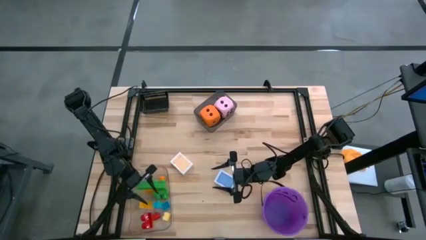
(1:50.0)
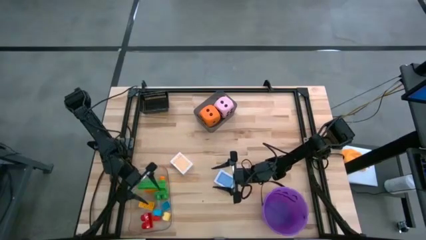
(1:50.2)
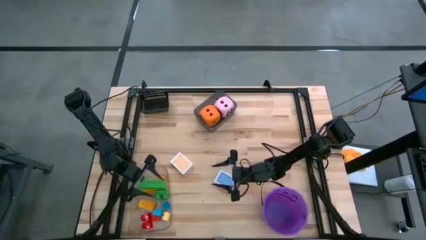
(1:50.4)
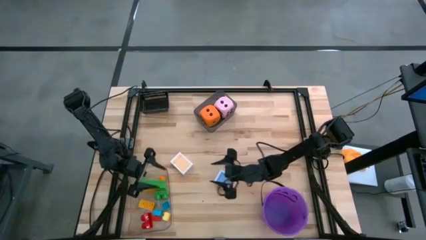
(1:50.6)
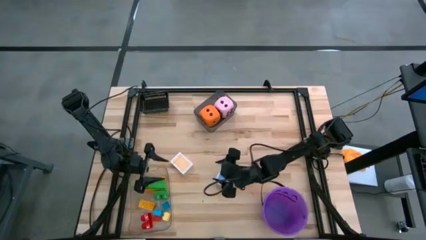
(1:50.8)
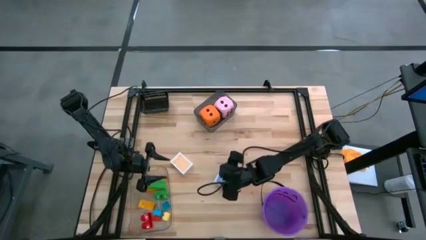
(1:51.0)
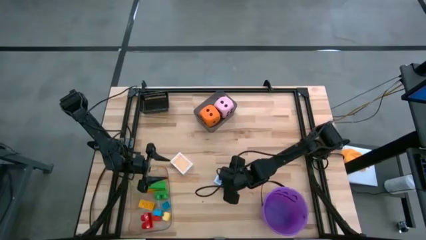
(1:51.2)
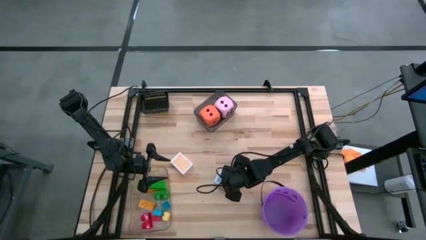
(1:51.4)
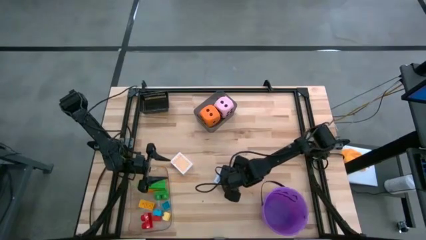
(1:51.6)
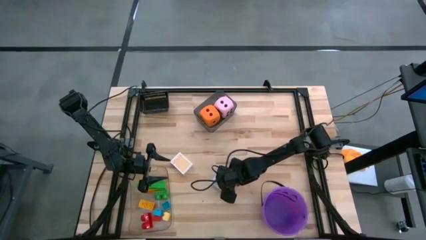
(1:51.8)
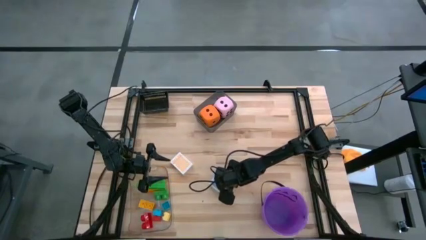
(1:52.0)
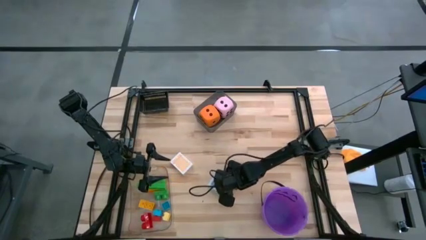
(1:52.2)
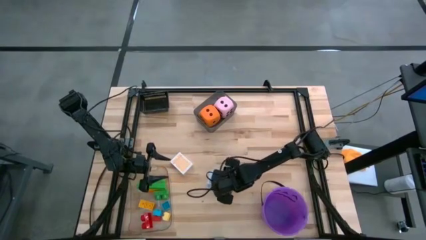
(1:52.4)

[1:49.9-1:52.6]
Task: Pick & Place Toys
Put the blue deck of cards into the black bin

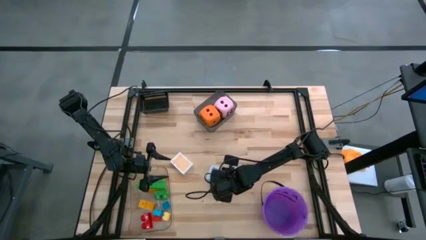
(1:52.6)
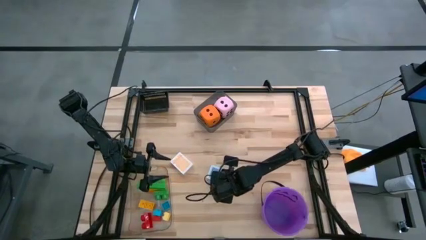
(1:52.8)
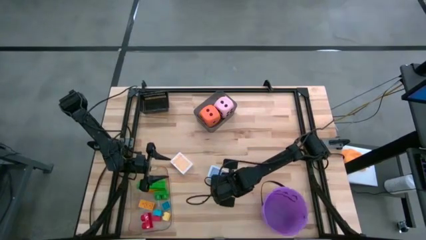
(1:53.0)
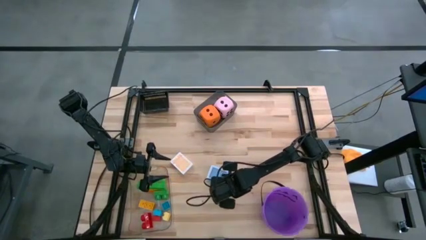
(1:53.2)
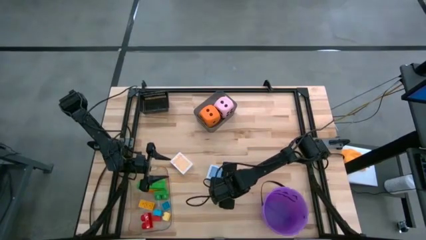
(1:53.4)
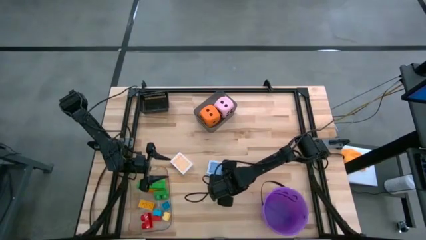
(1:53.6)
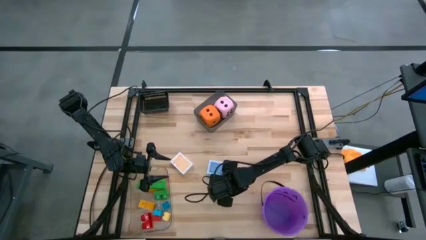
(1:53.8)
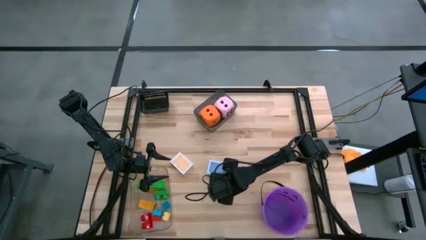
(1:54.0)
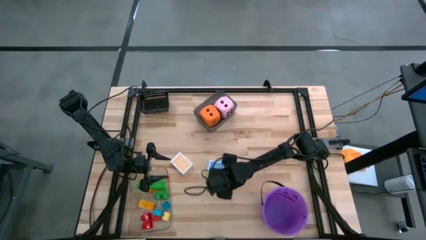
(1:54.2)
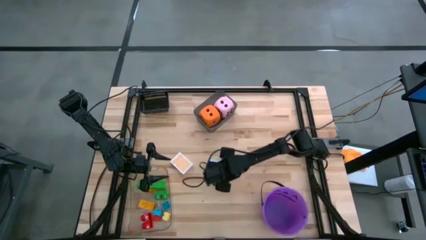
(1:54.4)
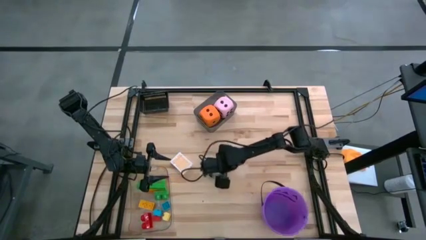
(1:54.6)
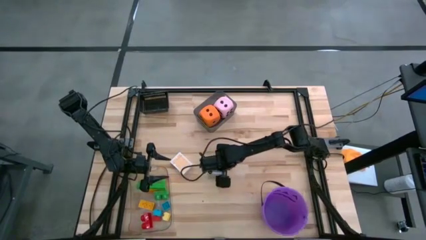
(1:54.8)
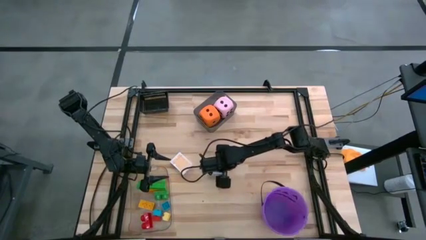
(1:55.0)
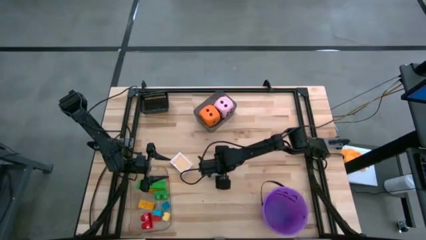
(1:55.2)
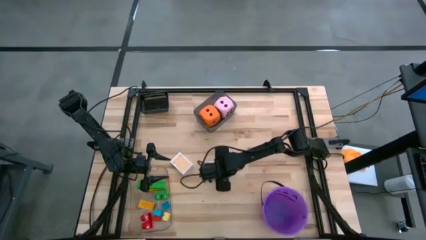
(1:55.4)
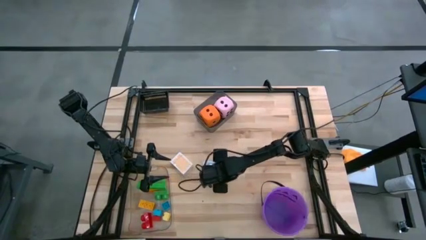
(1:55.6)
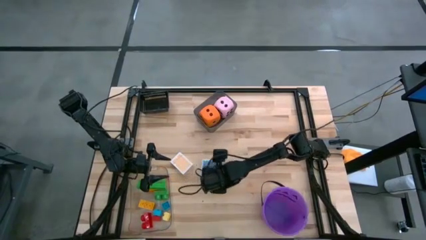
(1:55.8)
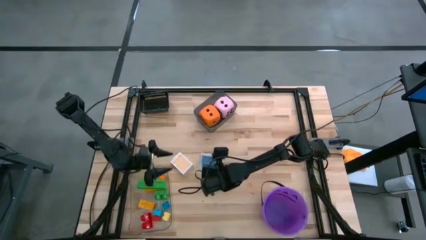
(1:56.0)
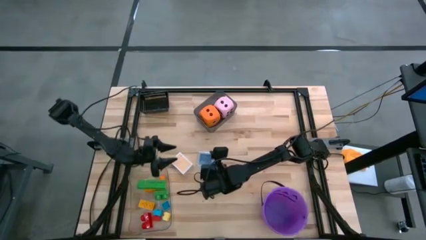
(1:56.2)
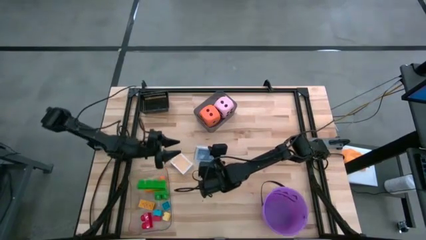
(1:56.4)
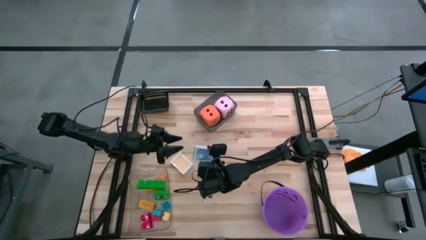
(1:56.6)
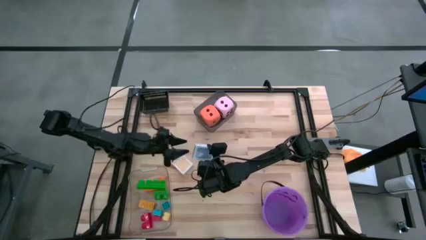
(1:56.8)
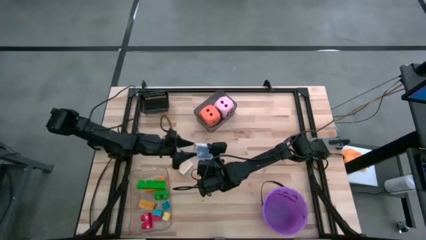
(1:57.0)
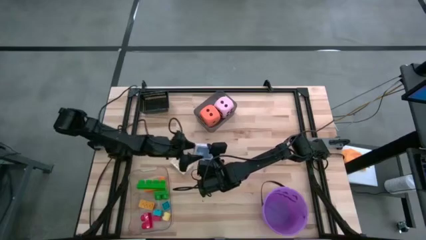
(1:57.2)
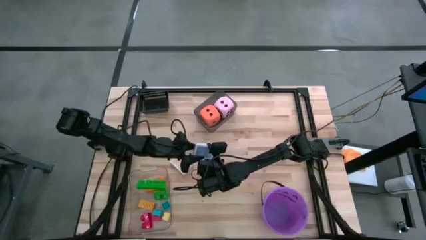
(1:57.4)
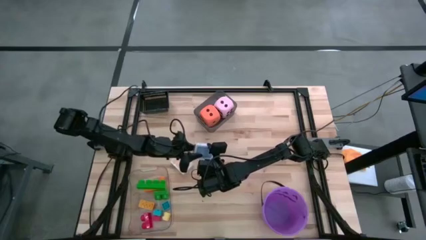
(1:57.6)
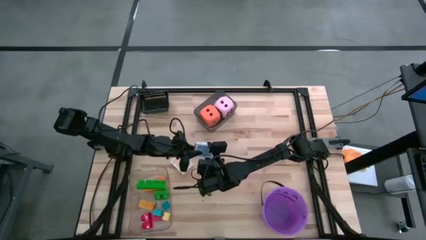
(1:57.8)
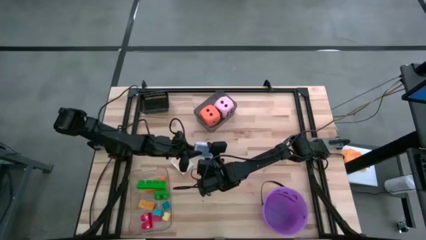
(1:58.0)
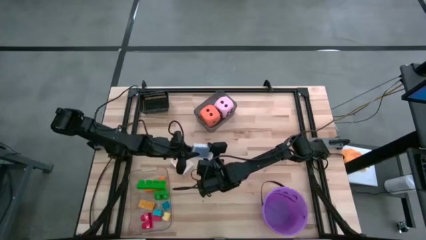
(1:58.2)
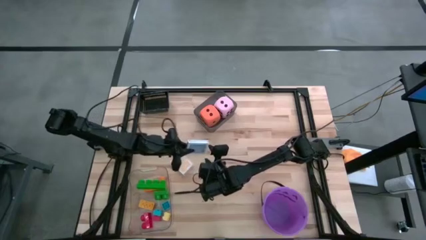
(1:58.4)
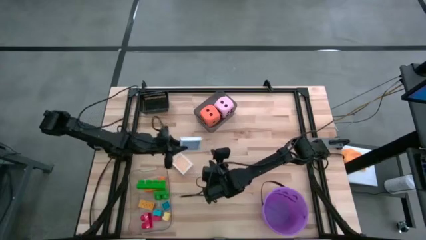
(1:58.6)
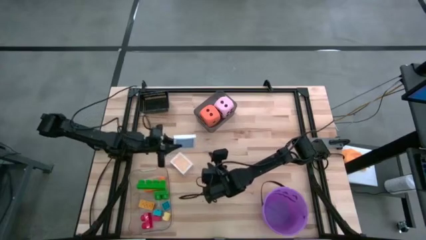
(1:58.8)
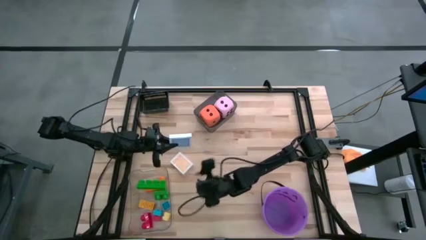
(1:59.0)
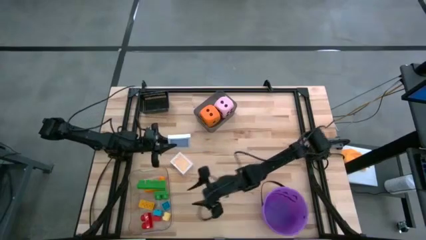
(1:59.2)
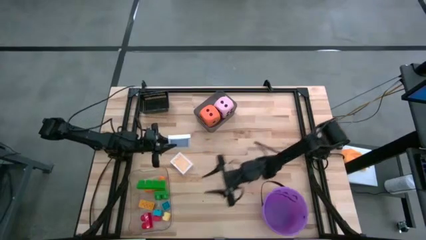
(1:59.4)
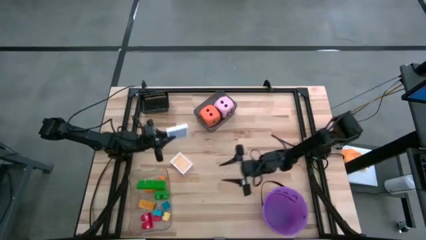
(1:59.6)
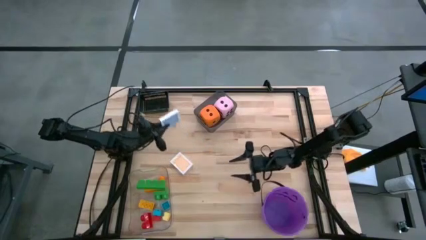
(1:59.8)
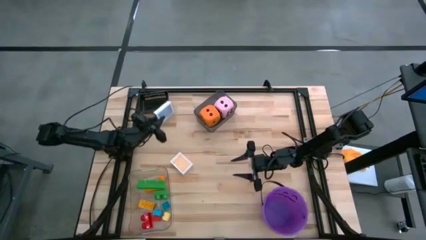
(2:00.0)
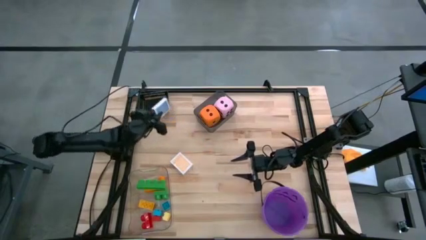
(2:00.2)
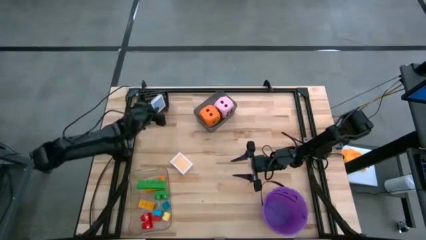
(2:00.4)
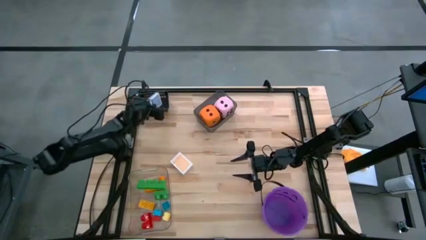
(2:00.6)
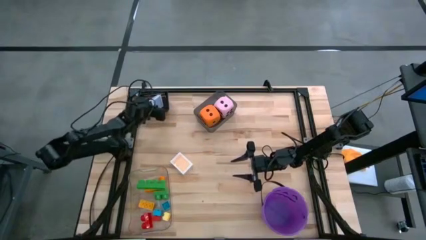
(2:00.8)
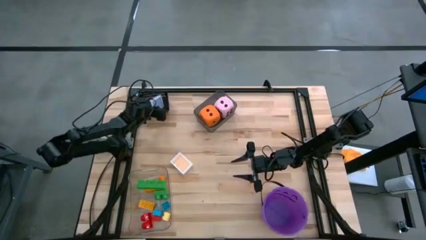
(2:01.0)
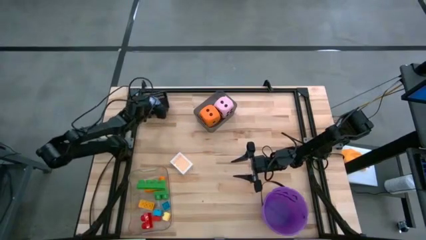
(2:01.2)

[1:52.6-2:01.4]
Put the blue deck of cards into the black bin

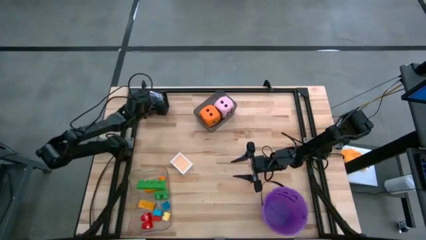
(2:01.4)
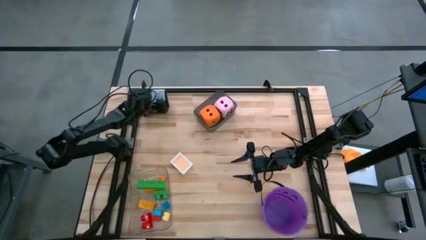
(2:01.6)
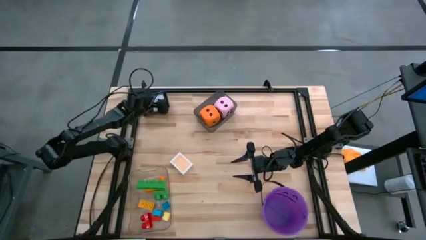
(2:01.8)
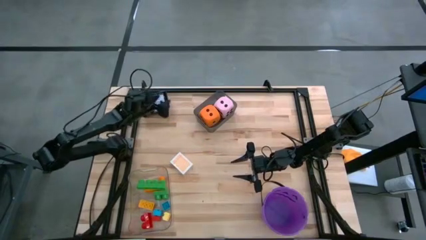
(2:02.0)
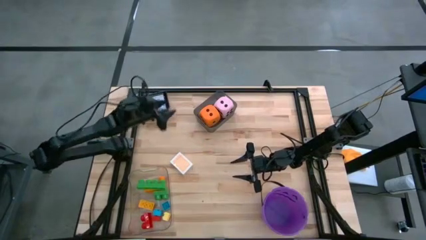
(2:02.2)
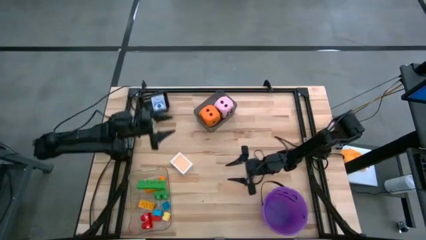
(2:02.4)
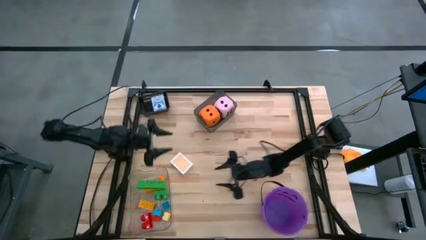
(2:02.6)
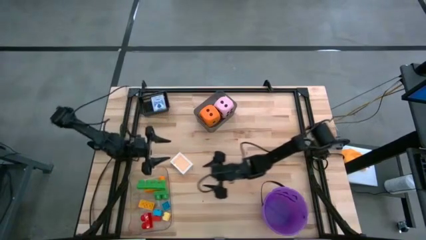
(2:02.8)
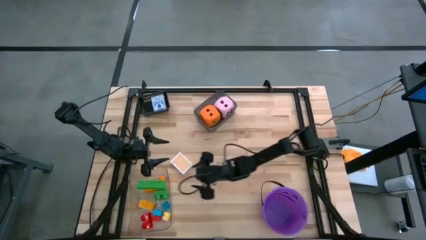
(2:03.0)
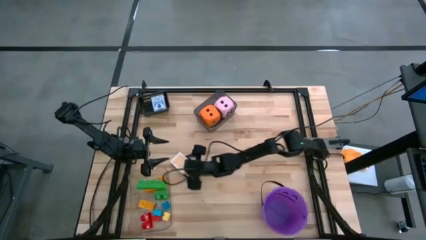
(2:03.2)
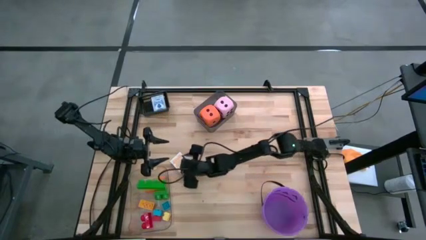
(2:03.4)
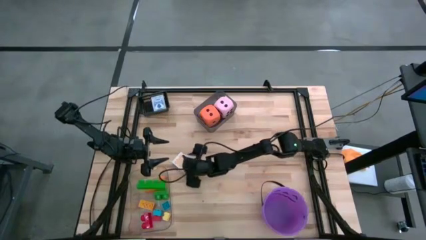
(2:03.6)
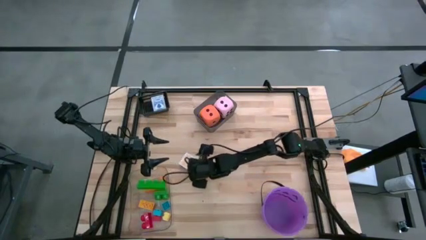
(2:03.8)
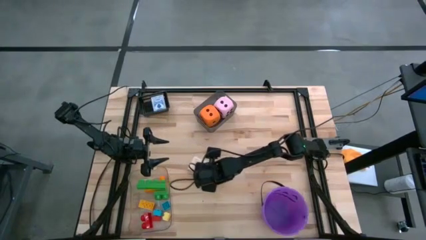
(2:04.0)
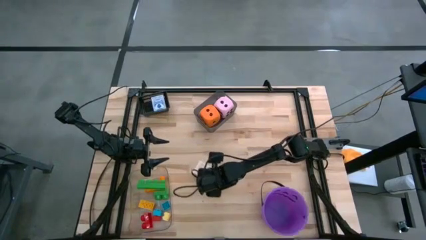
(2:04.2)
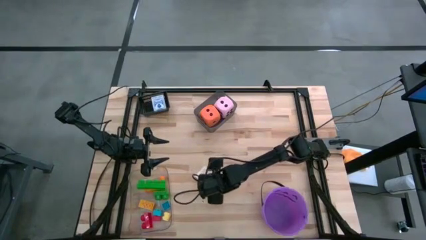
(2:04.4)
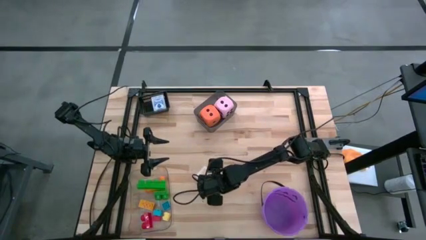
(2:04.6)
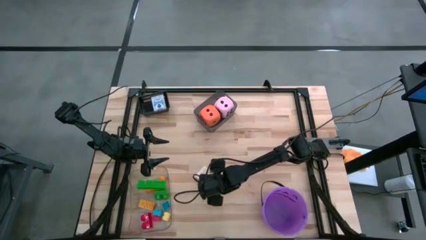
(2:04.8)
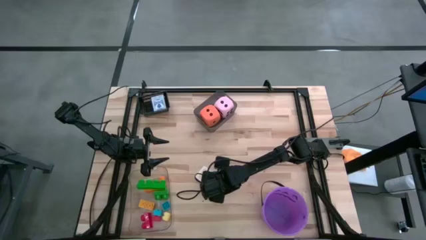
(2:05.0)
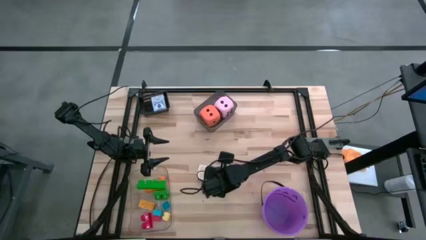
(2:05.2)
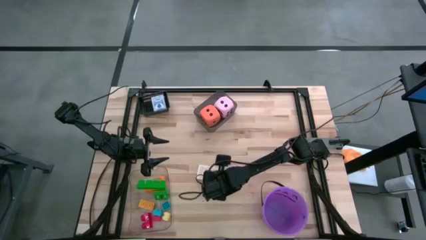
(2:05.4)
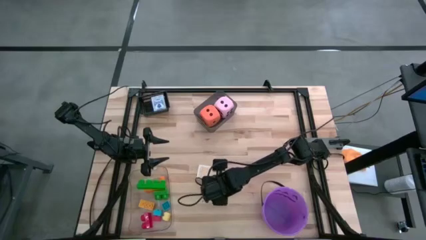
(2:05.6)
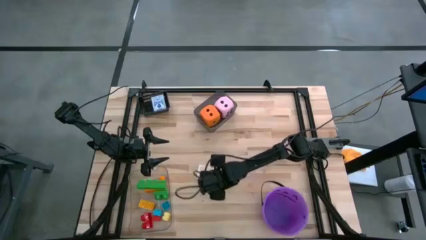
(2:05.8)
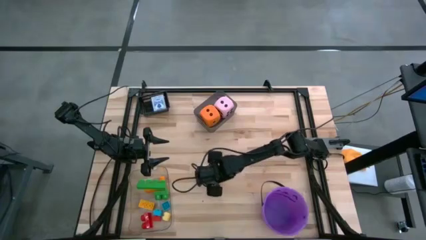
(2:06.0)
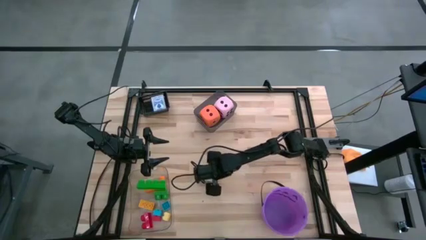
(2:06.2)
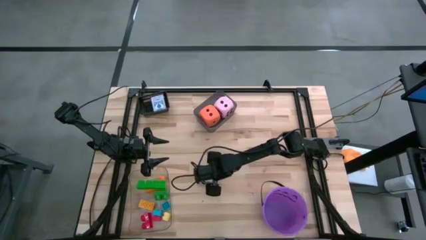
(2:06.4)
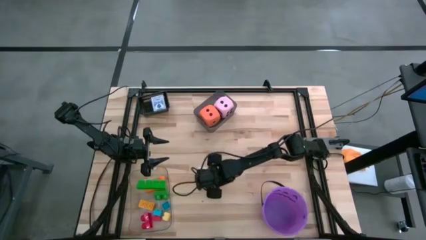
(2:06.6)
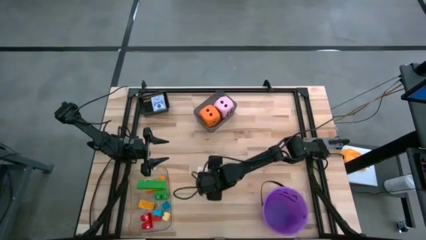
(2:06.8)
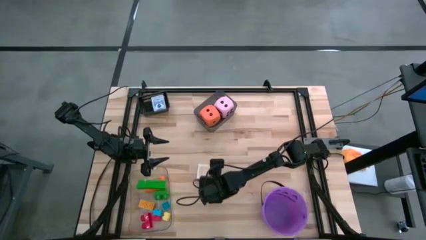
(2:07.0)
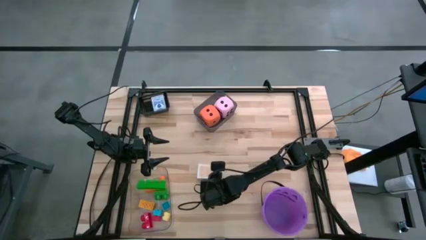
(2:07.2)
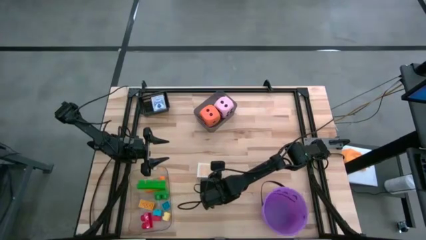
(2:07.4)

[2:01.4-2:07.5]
Put the yellow deck of cards into the black bin
